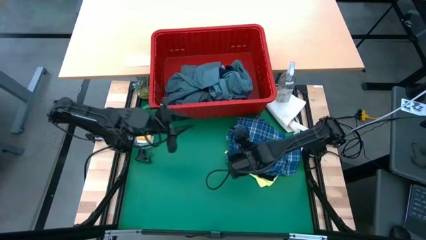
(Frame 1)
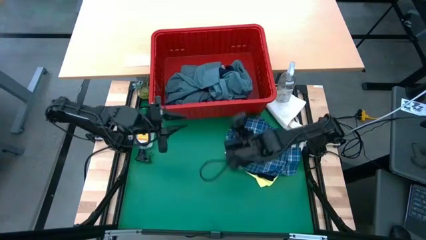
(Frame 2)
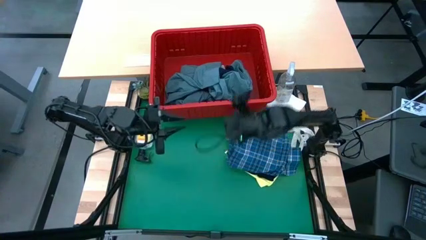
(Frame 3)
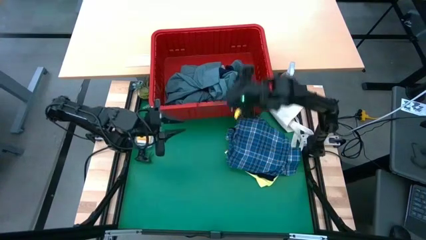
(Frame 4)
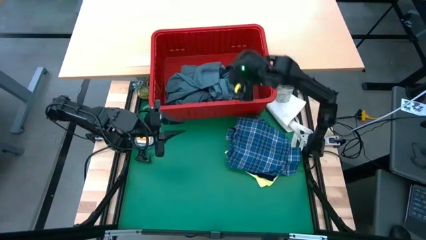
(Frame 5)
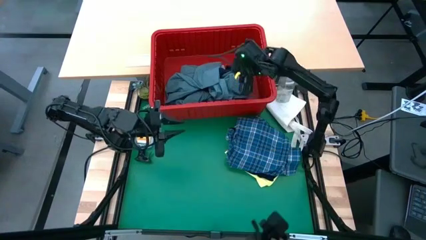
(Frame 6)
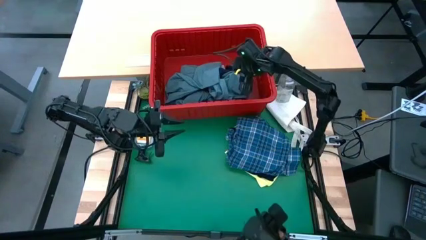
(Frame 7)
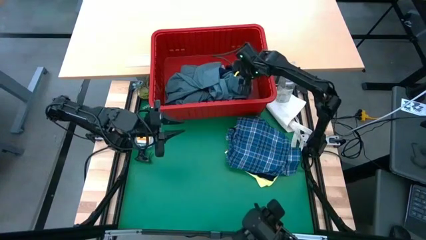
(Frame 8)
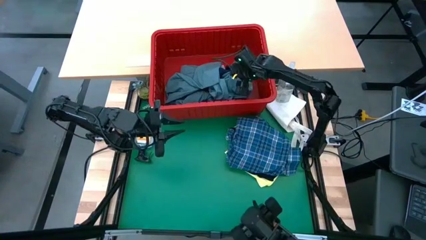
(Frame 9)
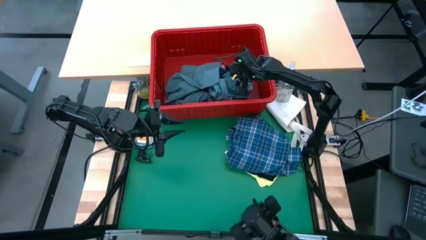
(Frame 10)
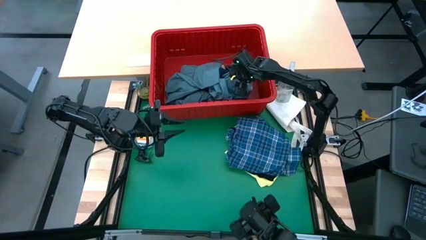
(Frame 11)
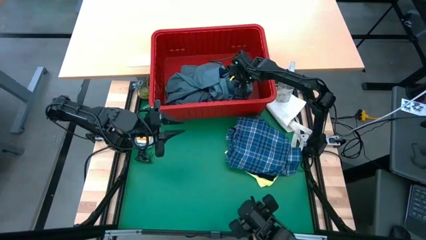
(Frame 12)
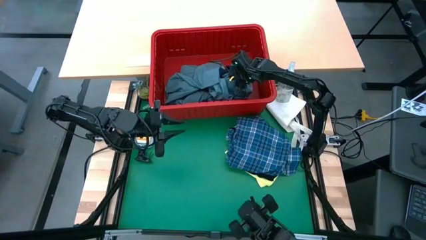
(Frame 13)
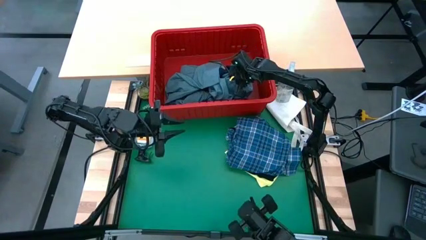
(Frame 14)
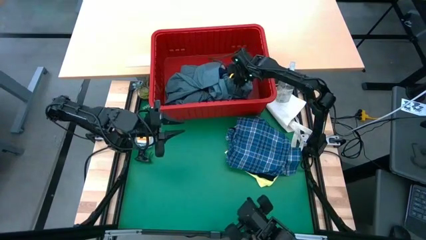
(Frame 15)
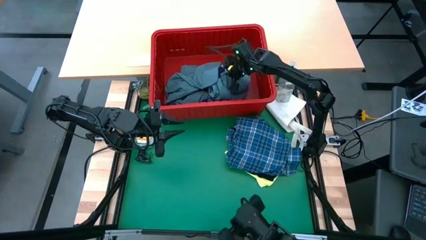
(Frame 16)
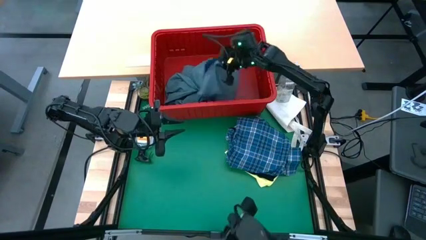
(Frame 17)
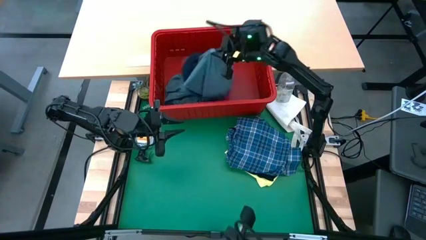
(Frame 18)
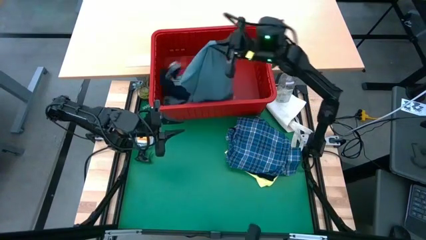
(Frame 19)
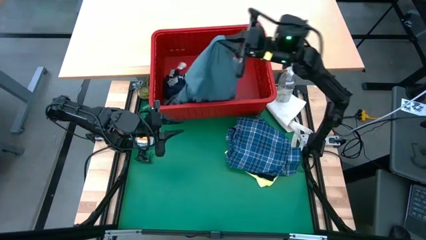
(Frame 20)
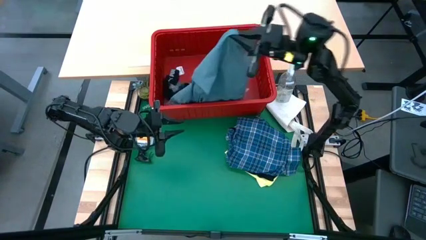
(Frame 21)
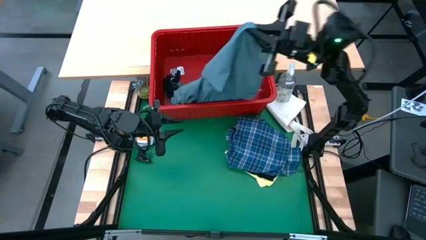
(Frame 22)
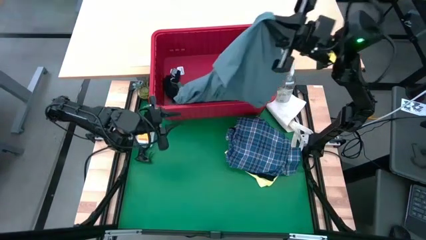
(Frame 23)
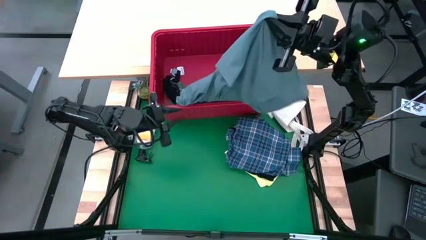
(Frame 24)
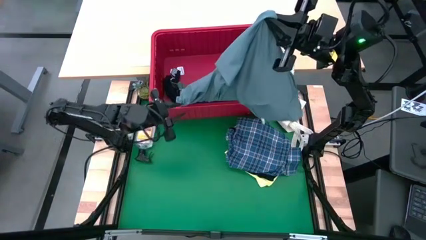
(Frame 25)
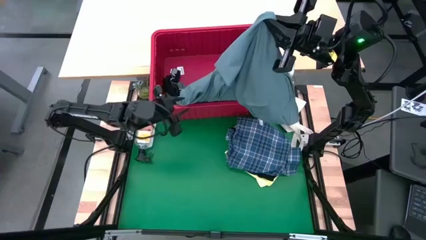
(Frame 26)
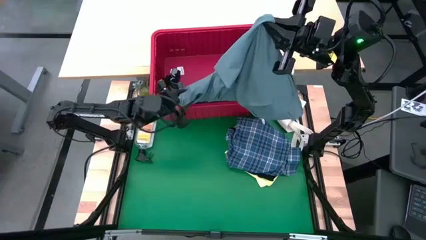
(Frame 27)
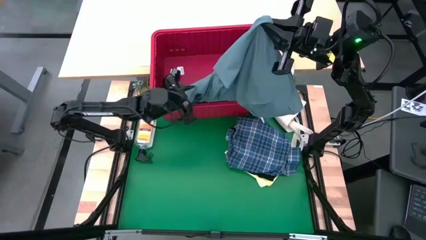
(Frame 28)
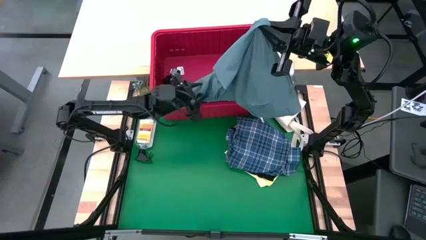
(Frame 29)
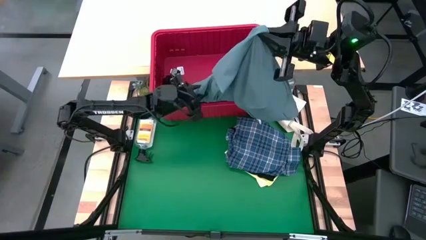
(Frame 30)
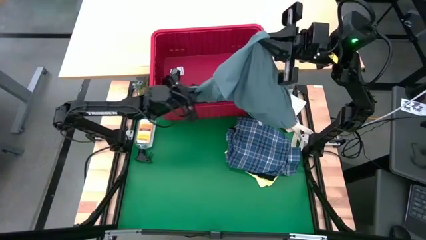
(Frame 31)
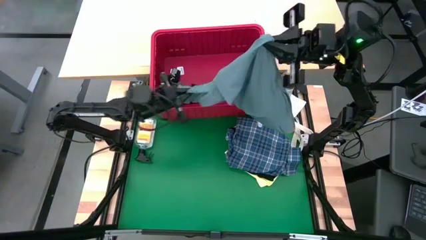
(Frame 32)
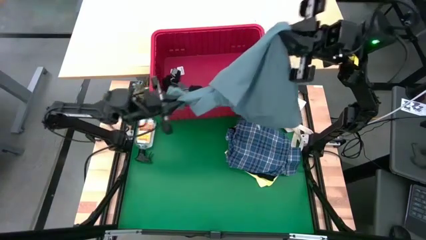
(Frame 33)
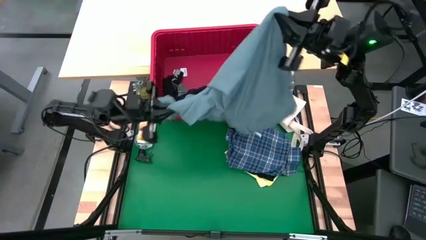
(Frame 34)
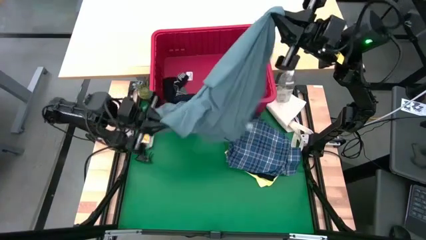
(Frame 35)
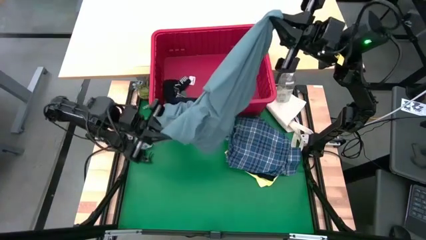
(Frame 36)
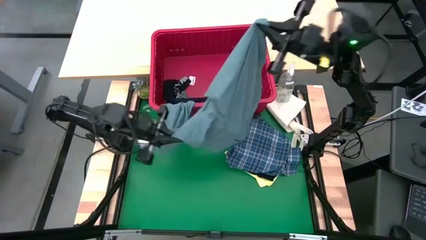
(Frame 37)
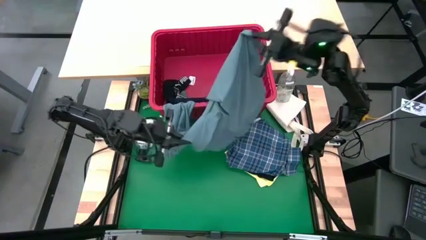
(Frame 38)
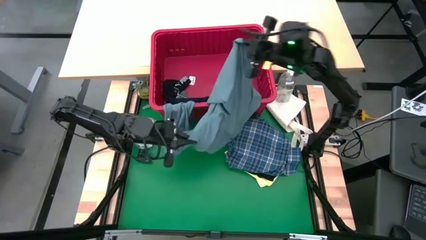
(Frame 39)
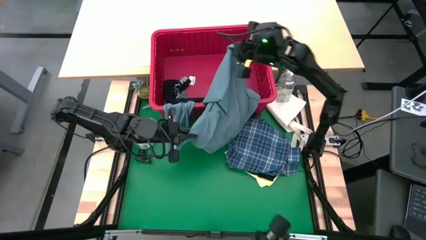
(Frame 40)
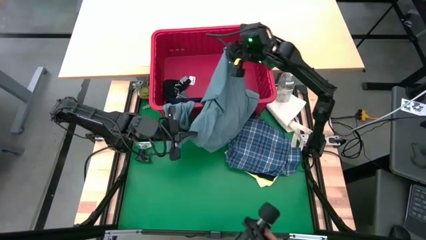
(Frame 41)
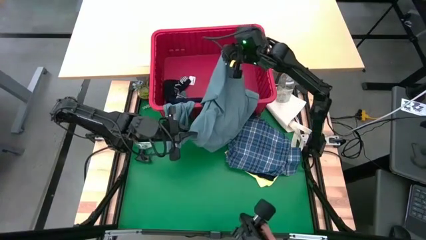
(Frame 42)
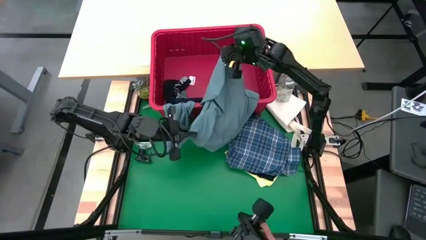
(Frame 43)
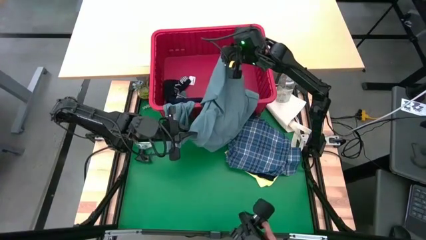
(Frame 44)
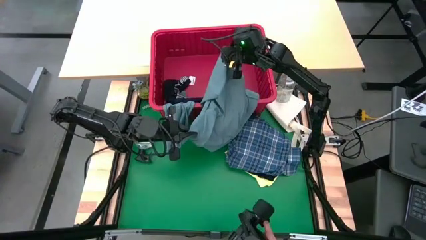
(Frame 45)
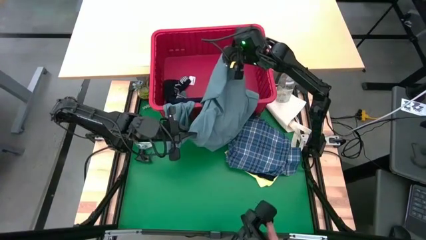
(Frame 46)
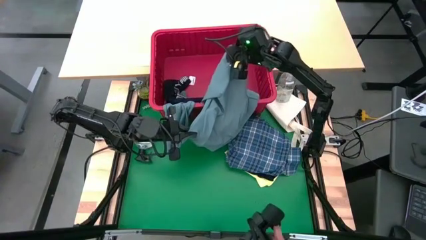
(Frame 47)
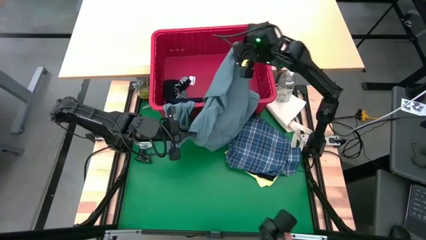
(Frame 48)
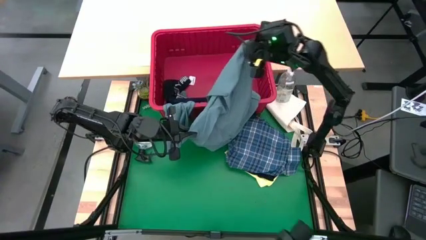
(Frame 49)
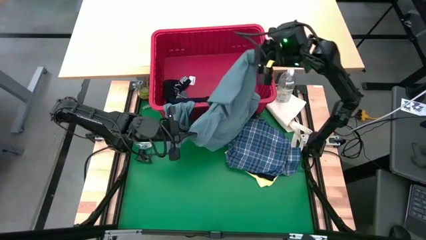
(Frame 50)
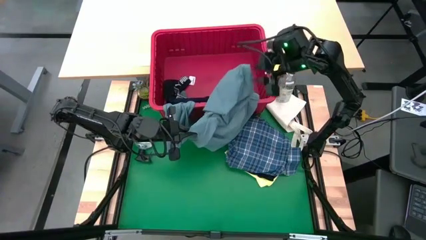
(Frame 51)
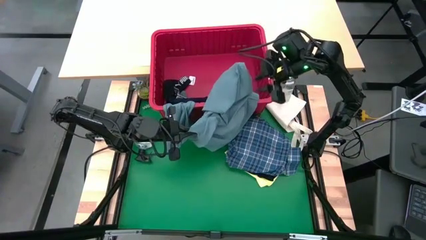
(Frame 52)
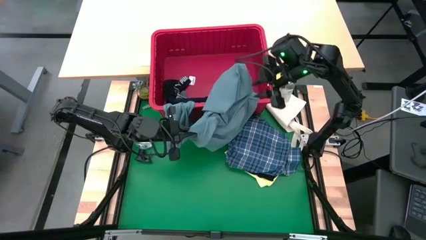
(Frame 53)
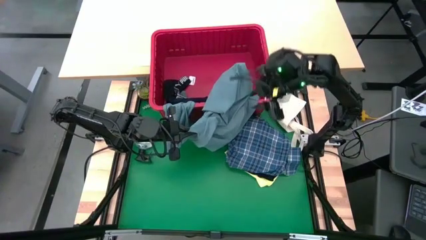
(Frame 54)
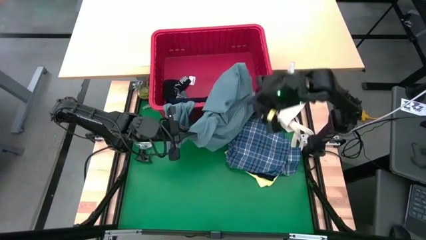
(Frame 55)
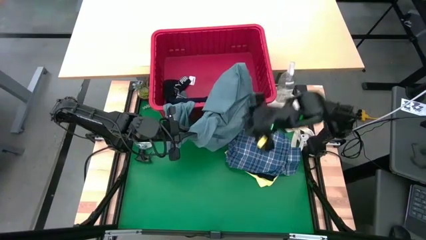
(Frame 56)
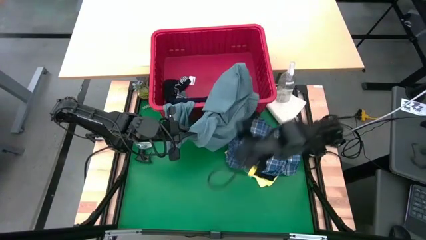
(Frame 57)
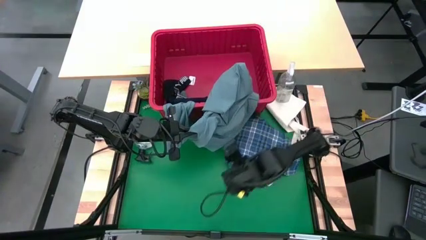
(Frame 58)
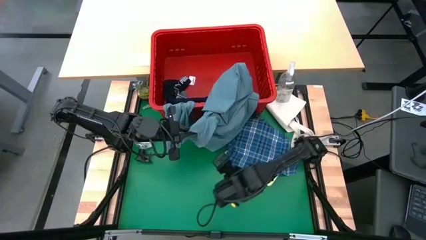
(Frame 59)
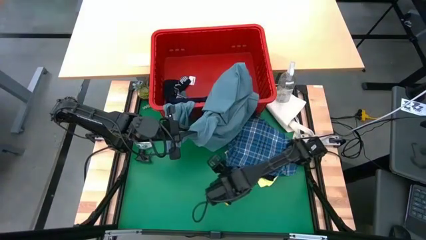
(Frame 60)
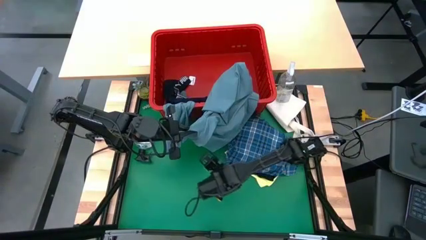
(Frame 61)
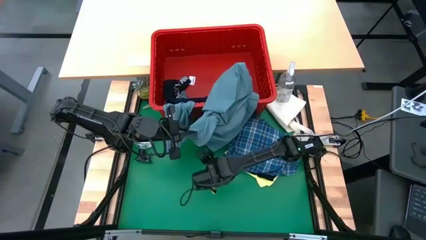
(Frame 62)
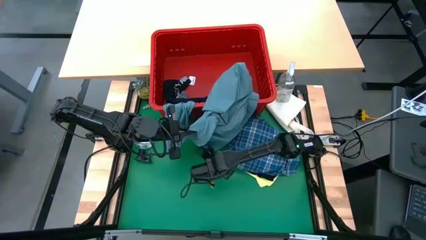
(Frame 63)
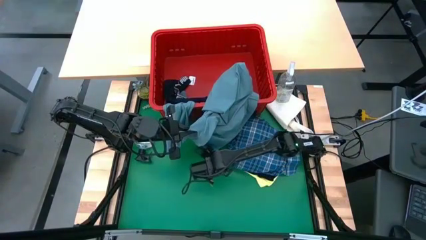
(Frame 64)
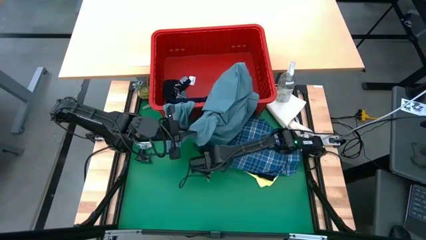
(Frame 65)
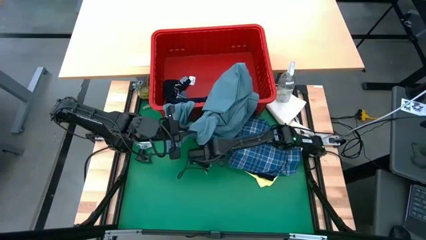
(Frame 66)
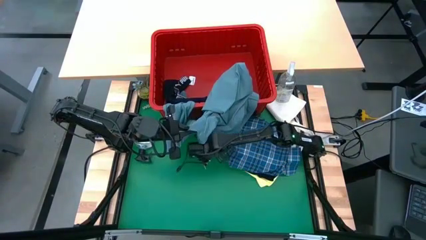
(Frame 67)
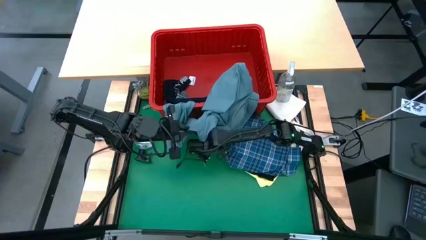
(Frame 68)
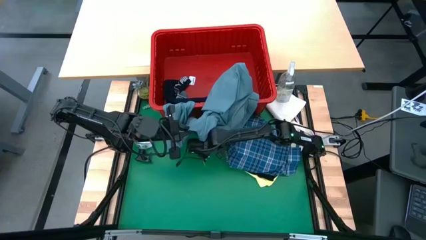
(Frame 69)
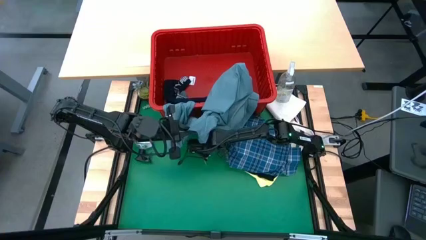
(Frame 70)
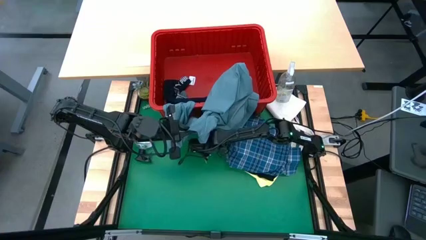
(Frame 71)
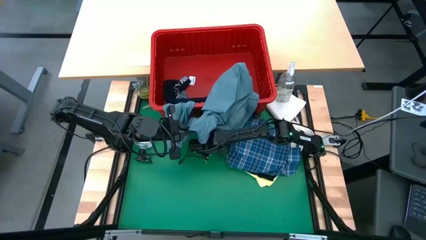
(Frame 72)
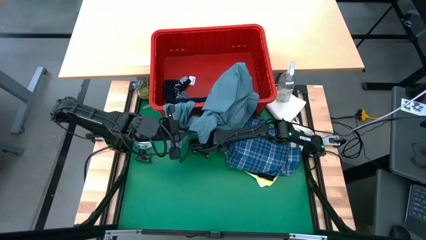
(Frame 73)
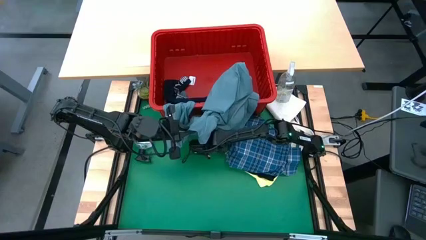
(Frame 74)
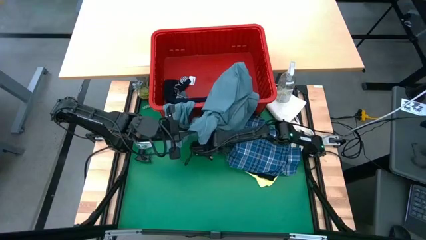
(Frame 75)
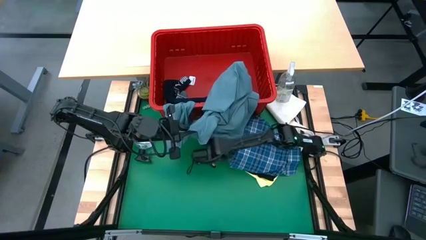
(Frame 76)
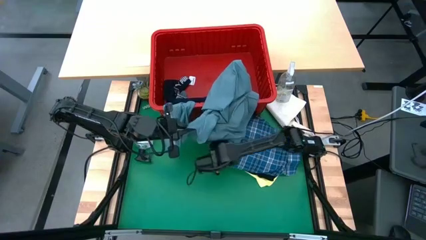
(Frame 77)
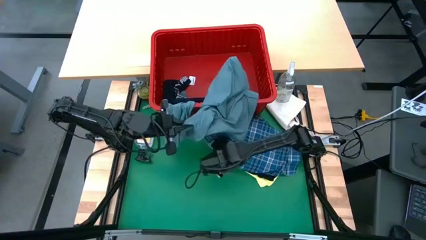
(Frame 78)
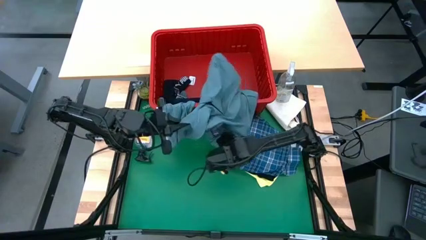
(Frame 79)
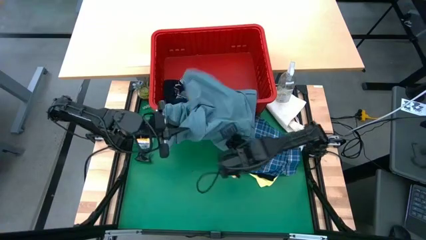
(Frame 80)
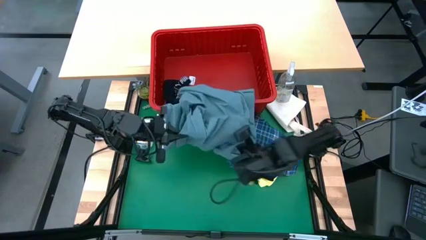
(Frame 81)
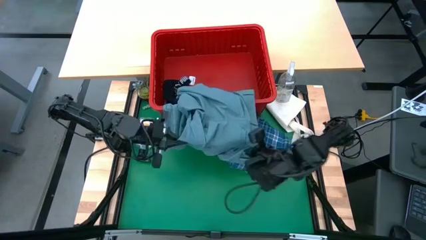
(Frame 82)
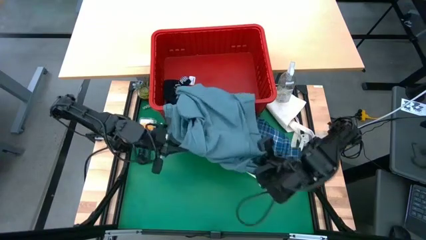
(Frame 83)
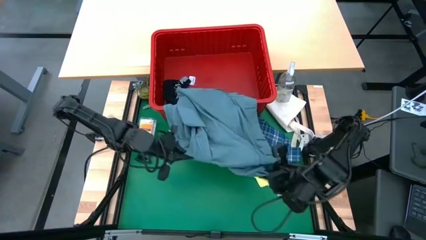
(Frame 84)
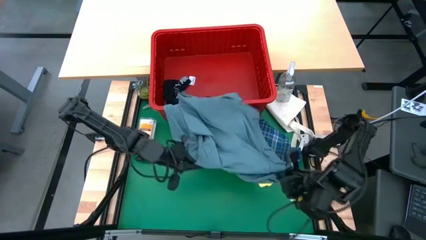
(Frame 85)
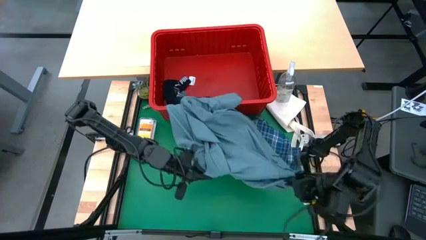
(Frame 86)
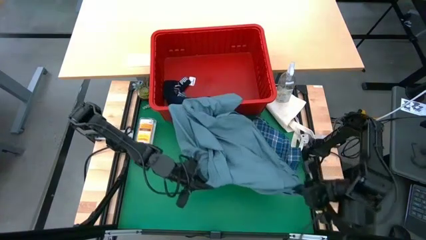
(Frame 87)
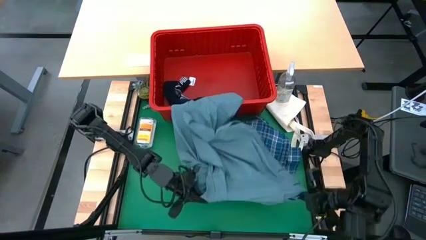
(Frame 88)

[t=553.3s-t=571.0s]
Task: Fold Laundry from Bin
Fold the blue pants on top of the blue shirt
